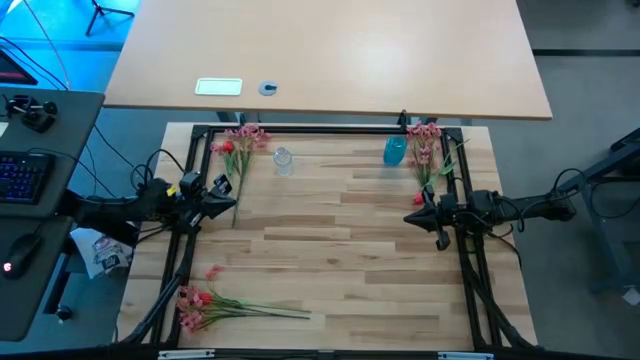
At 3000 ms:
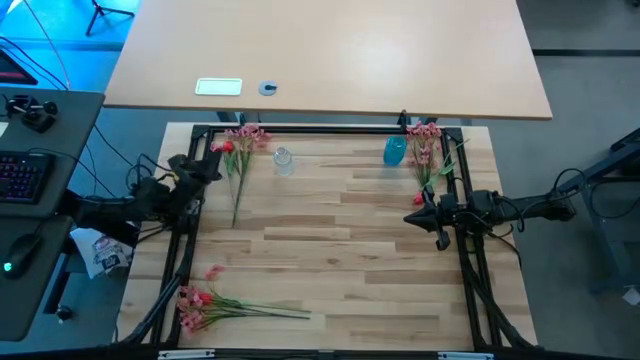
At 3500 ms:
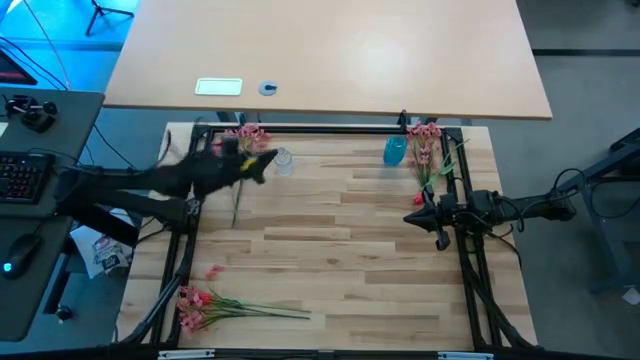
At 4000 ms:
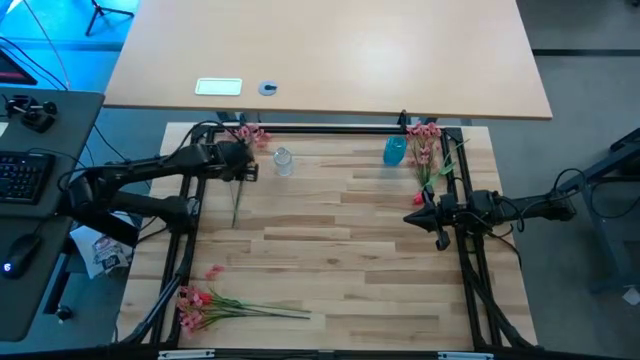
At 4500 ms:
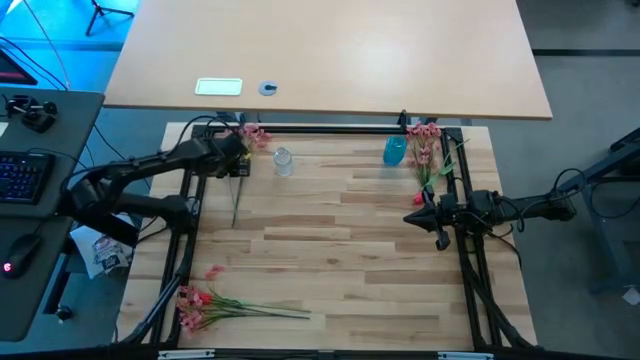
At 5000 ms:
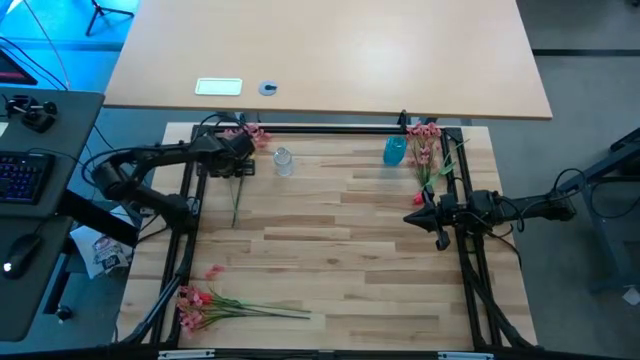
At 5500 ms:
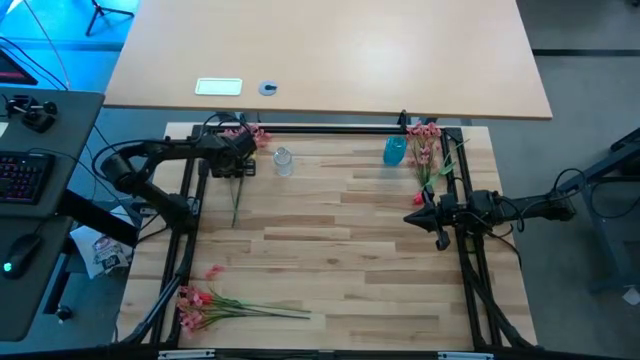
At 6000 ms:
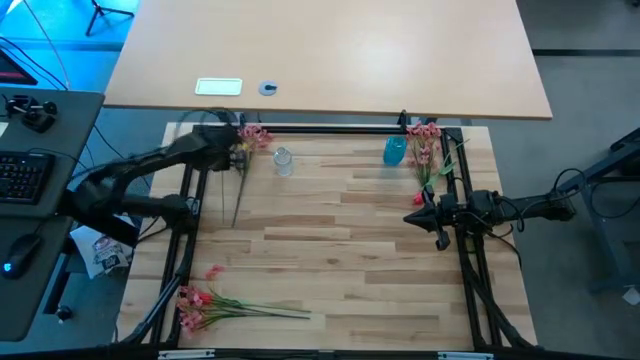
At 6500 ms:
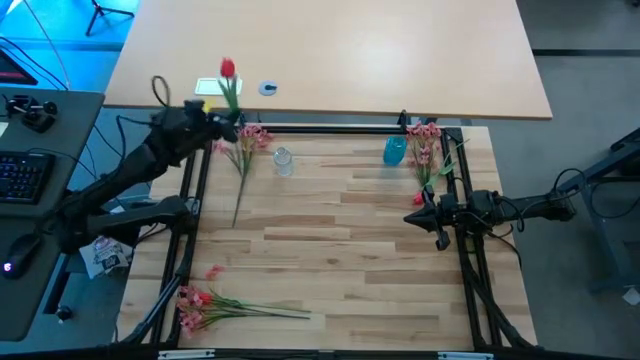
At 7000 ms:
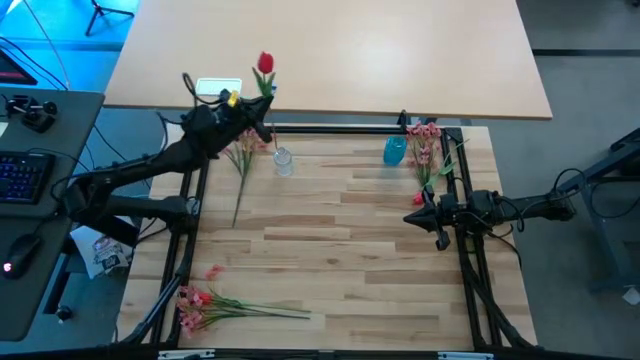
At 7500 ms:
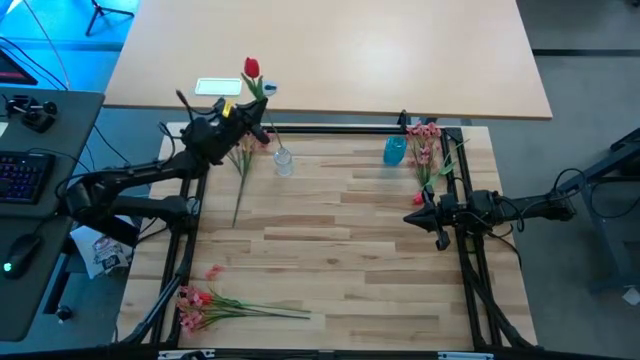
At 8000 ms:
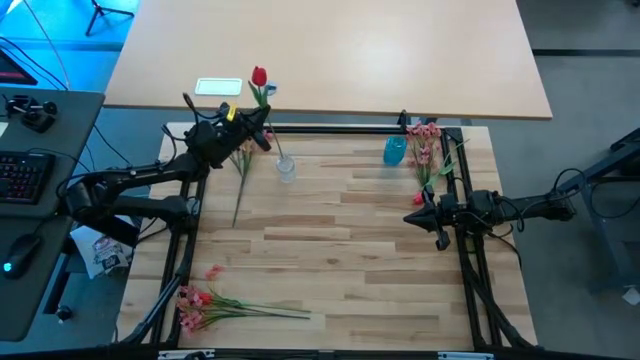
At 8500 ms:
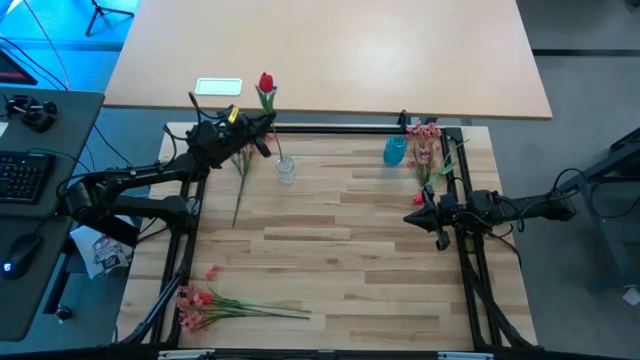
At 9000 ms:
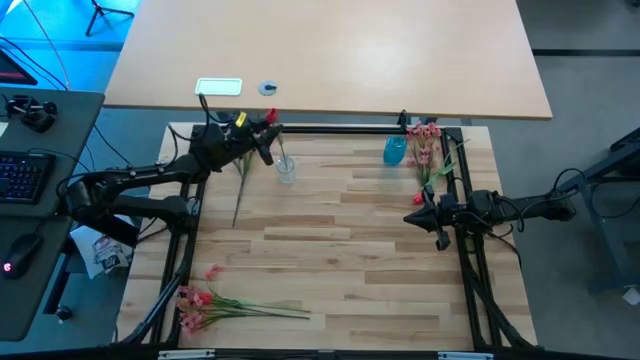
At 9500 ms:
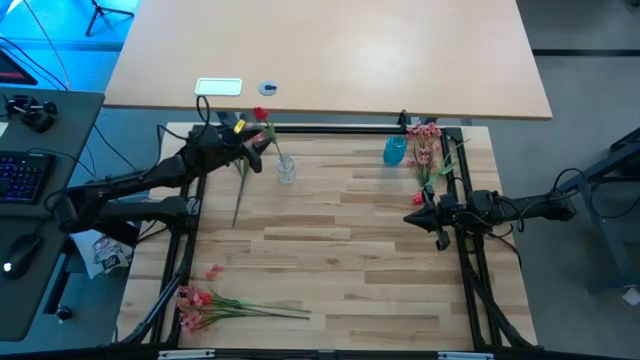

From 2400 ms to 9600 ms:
Task: Sort flowers into vase by color
Put the top left red flower into the transparent vase

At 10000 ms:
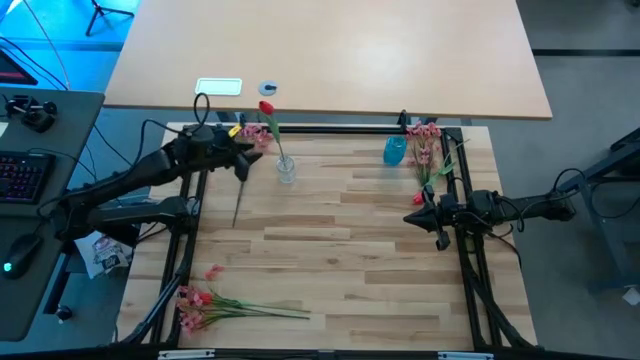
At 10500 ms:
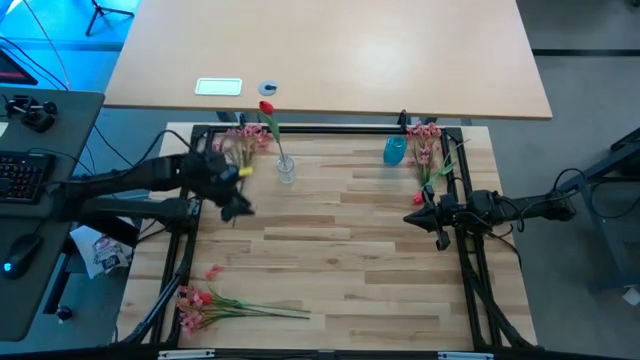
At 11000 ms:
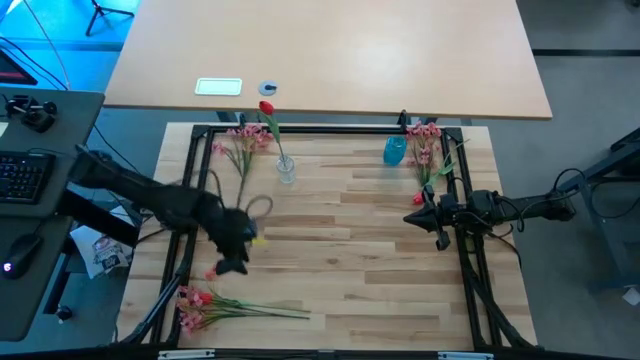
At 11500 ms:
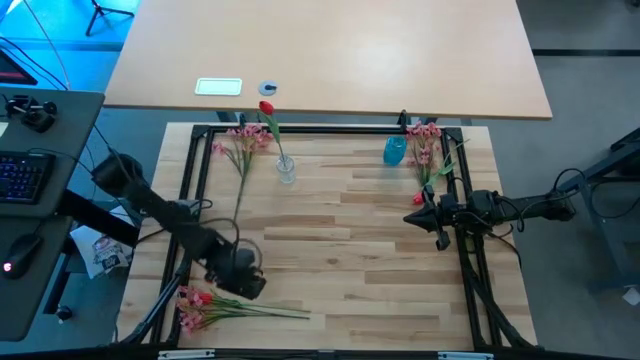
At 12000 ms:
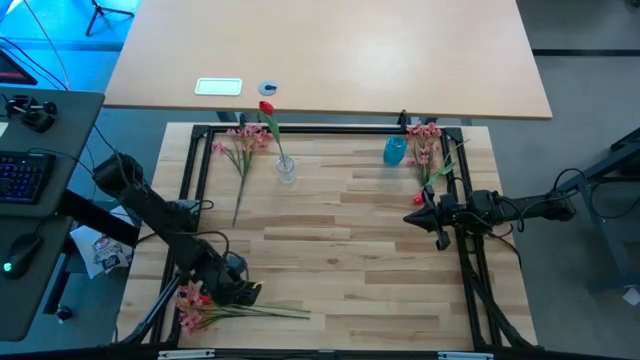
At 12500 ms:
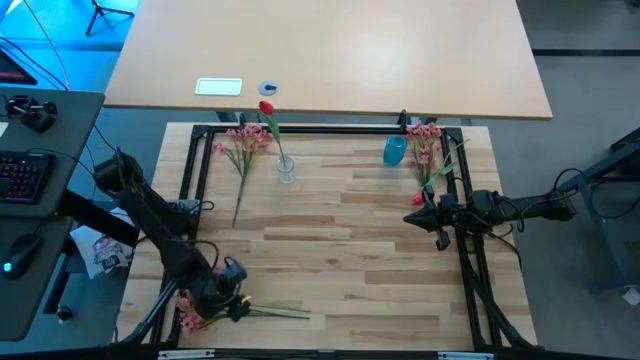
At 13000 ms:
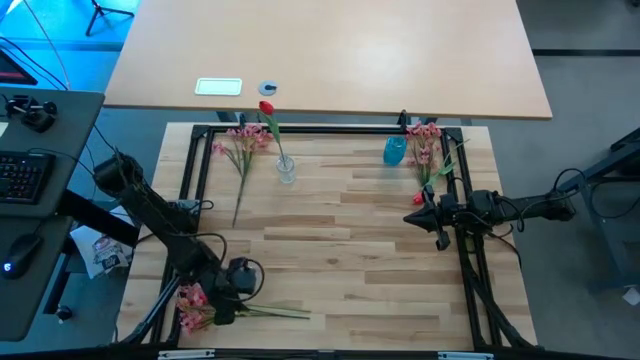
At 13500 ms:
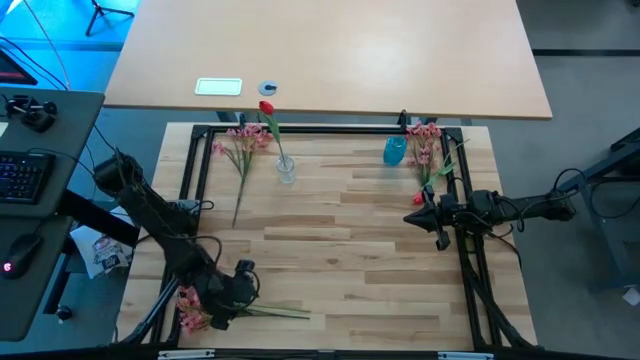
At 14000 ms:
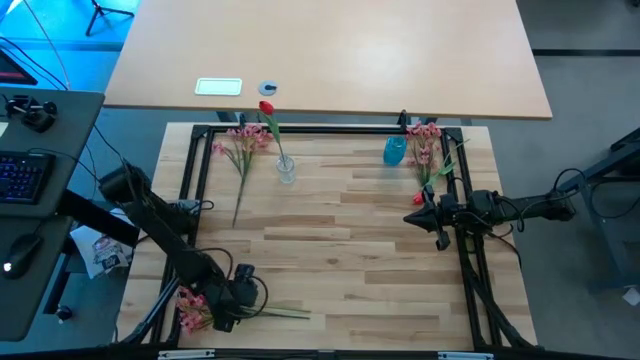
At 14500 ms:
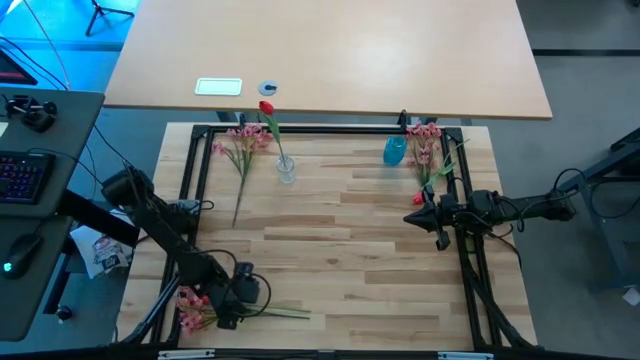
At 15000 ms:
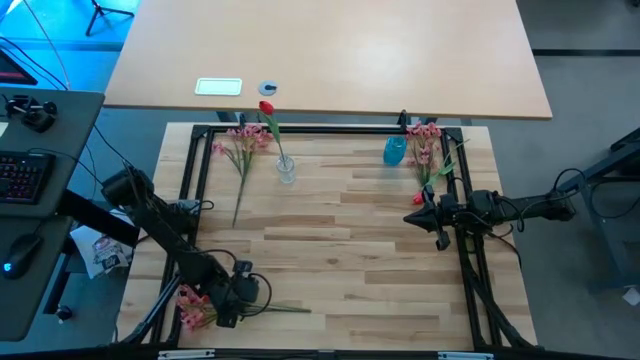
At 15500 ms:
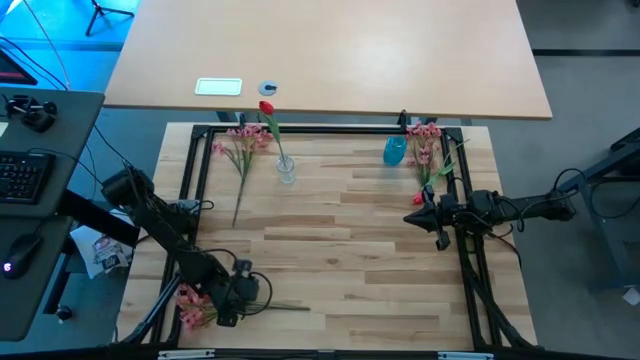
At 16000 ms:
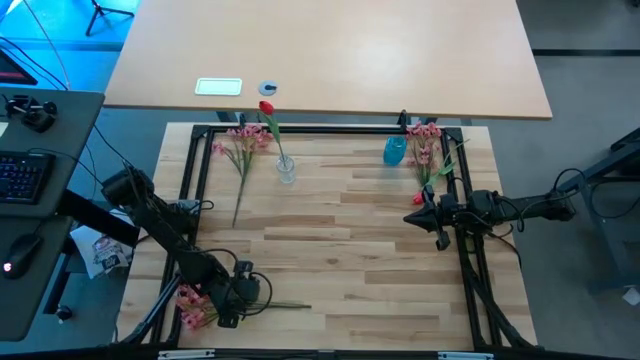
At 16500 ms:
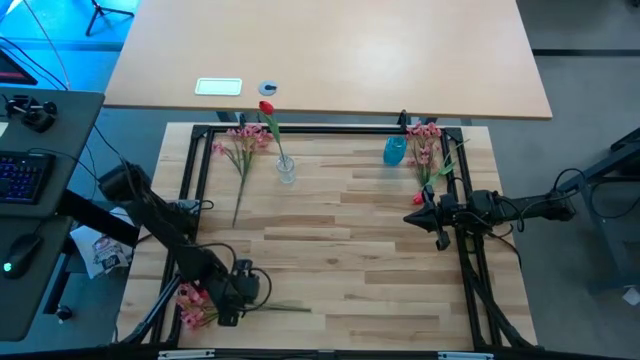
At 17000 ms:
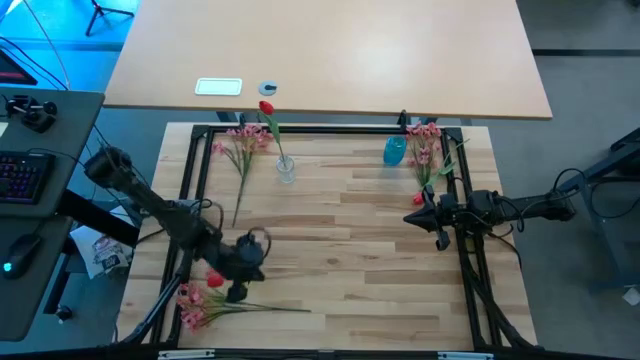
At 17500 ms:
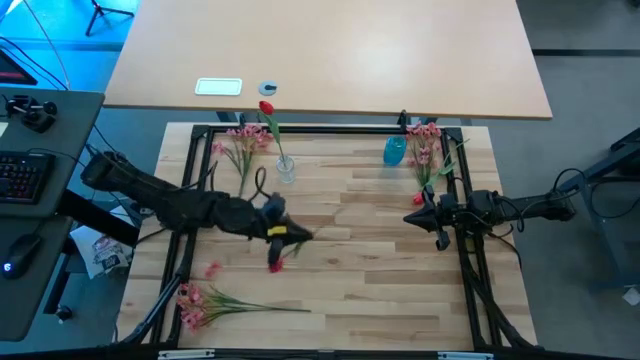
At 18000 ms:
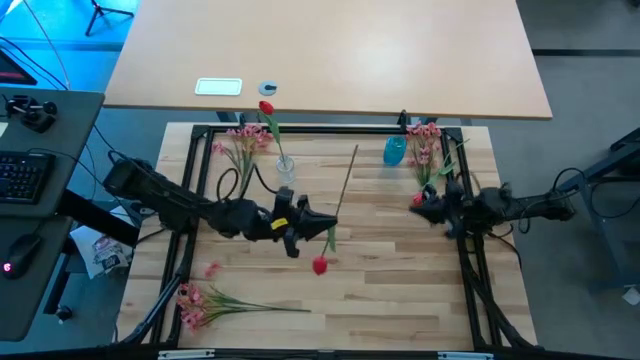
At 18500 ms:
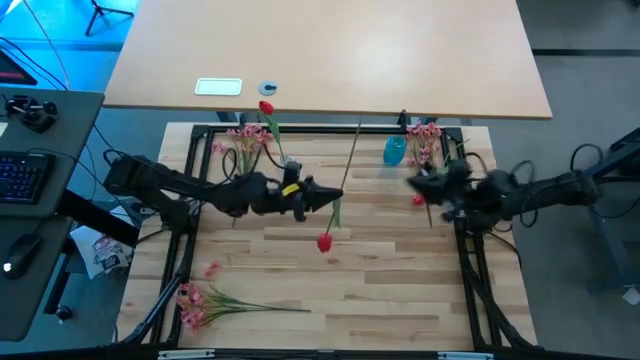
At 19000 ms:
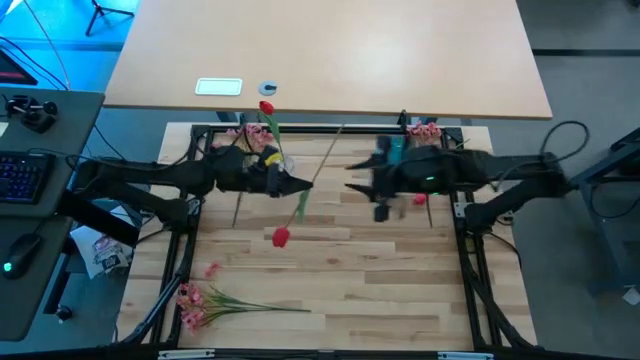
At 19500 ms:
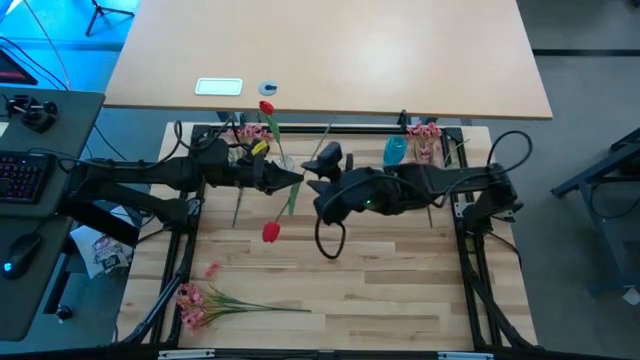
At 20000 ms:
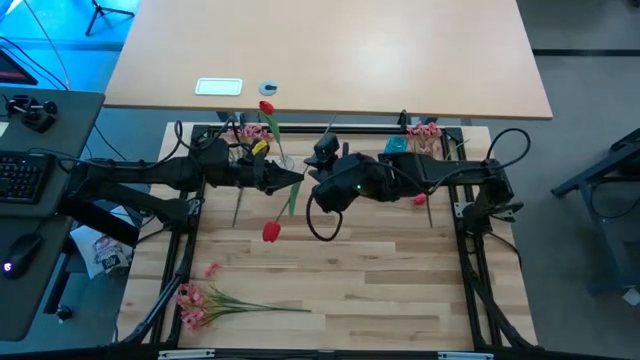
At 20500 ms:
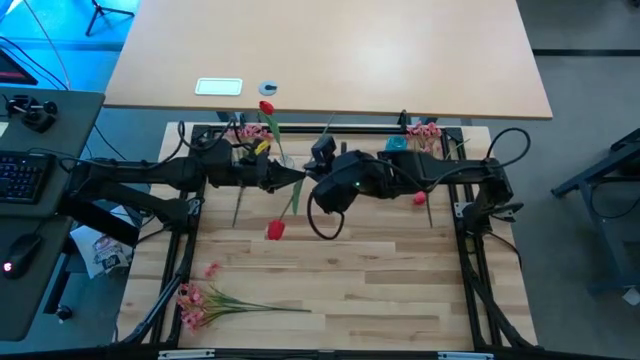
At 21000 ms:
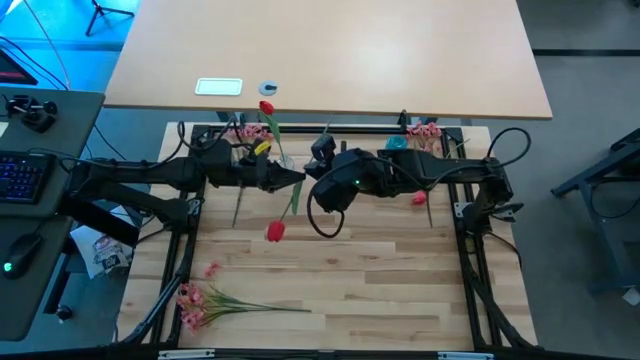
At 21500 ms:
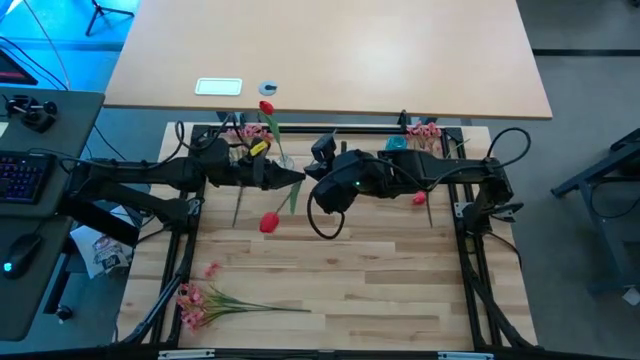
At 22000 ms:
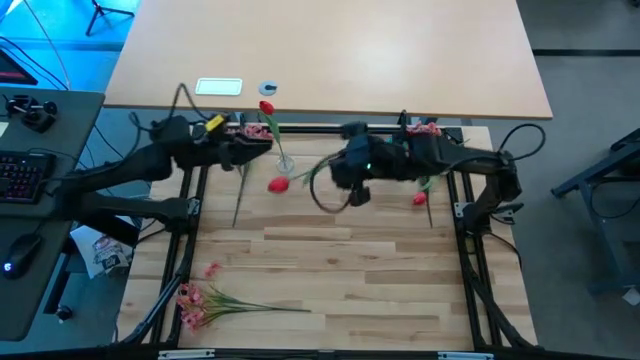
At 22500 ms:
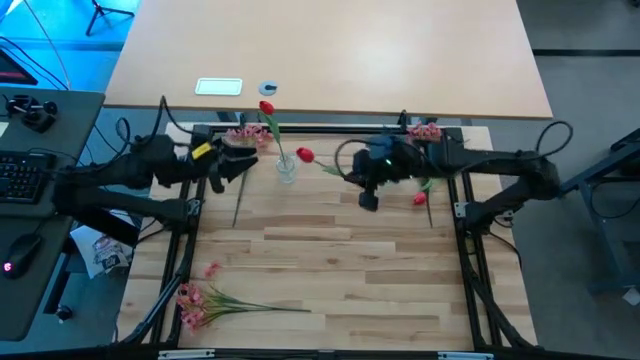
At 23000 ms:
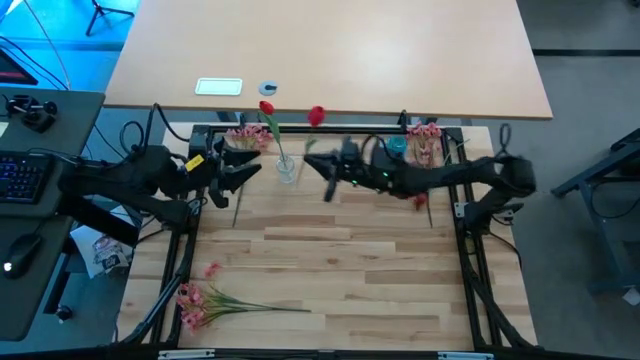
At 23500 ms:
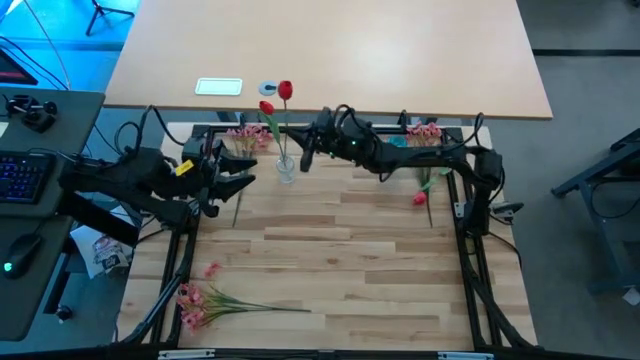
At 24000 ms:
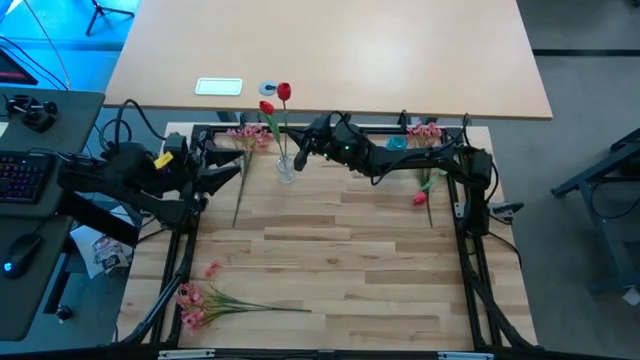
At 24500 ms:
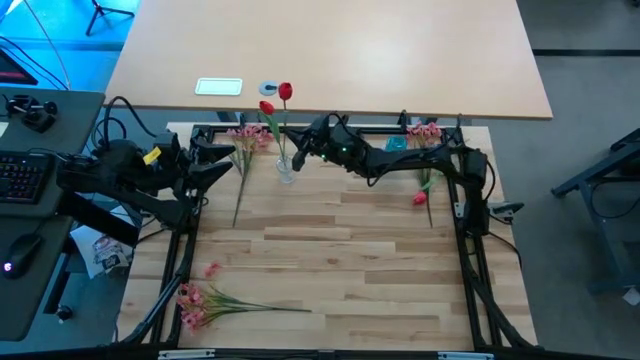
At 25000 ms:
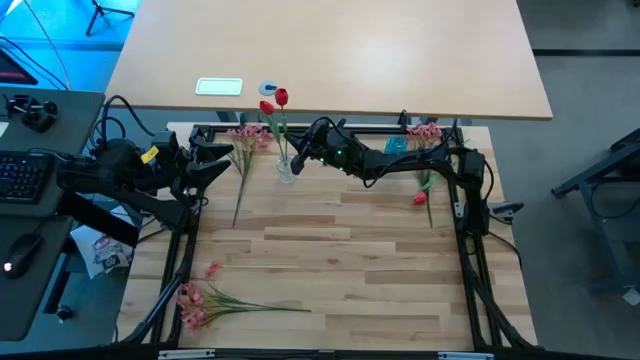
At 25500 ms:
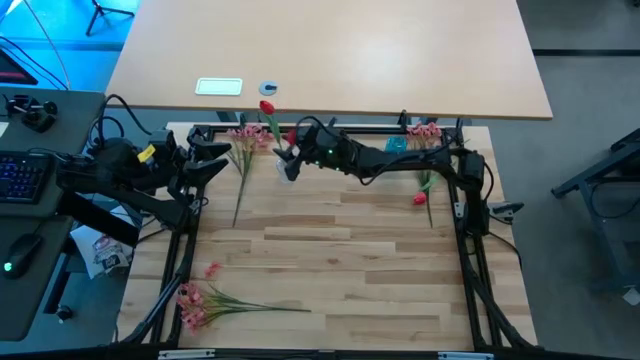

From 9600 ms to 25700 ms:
Put the bottom red flower into the transparent vase
